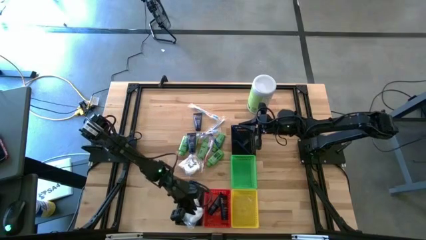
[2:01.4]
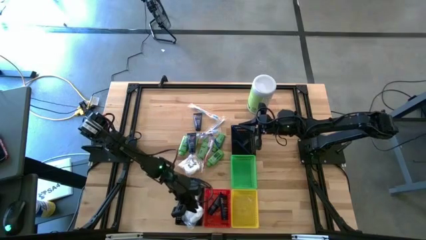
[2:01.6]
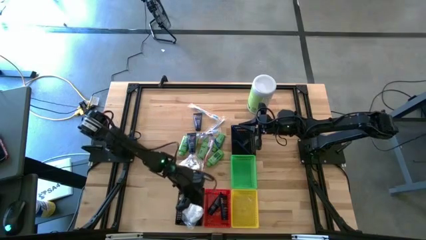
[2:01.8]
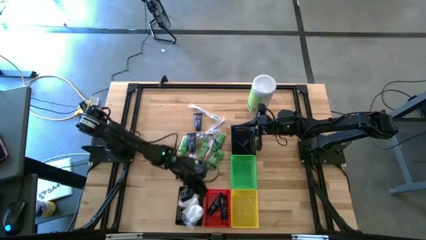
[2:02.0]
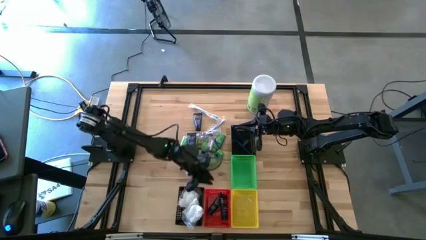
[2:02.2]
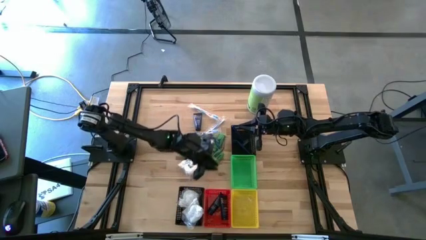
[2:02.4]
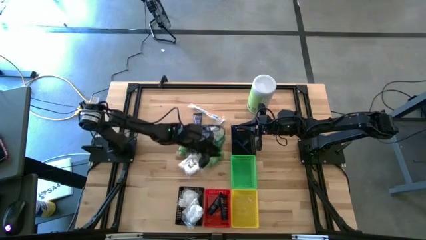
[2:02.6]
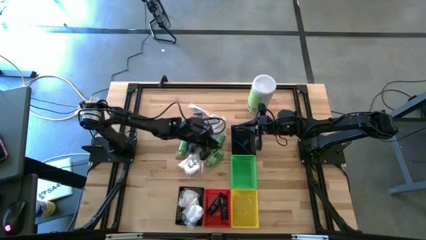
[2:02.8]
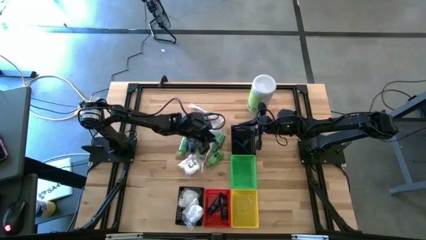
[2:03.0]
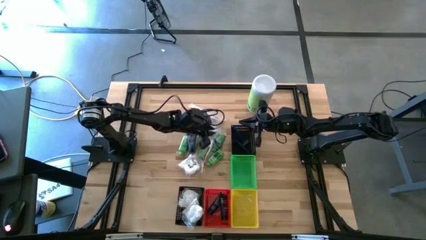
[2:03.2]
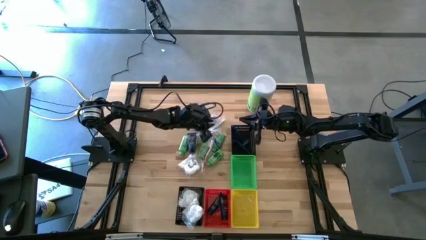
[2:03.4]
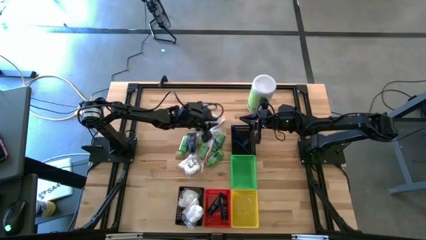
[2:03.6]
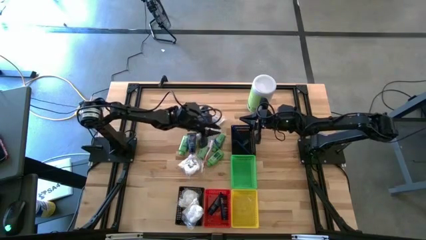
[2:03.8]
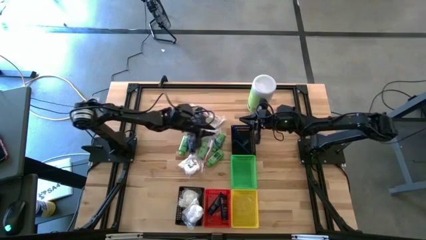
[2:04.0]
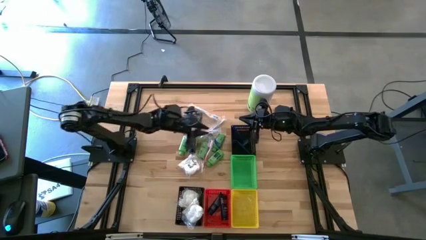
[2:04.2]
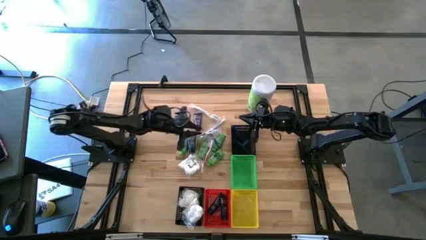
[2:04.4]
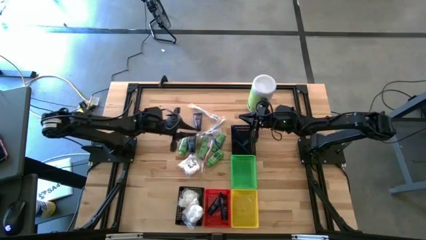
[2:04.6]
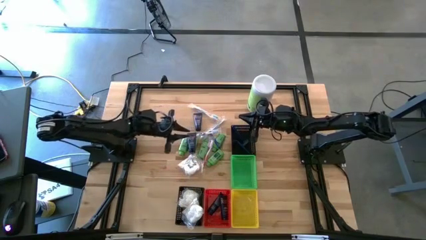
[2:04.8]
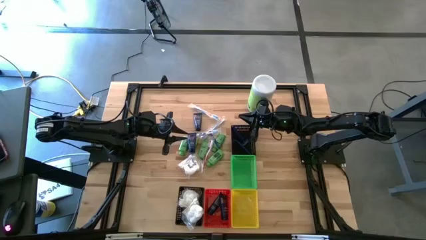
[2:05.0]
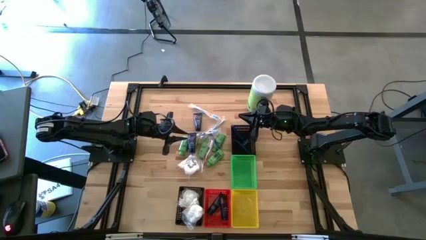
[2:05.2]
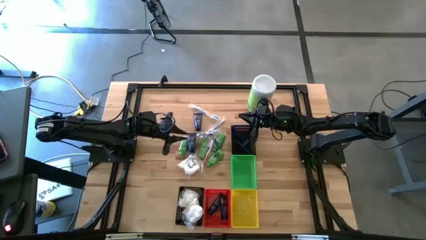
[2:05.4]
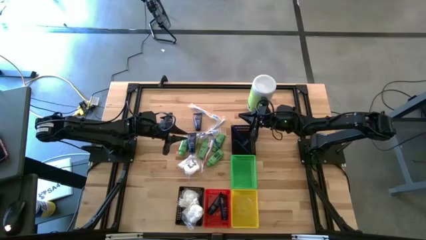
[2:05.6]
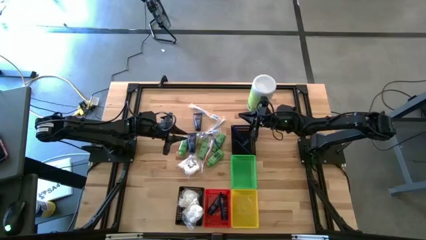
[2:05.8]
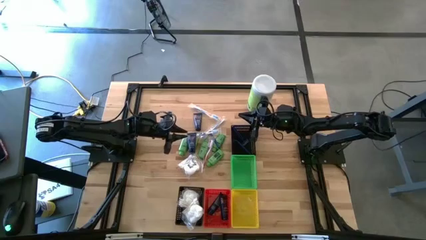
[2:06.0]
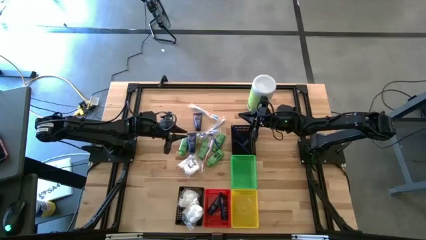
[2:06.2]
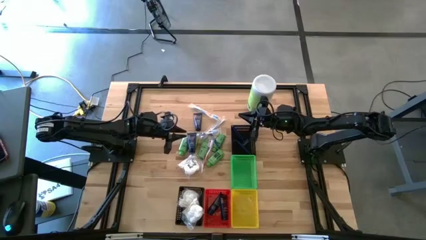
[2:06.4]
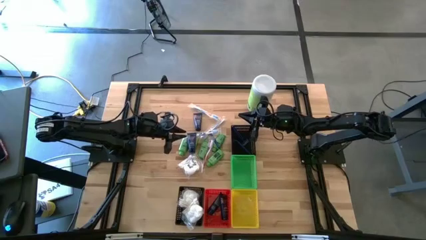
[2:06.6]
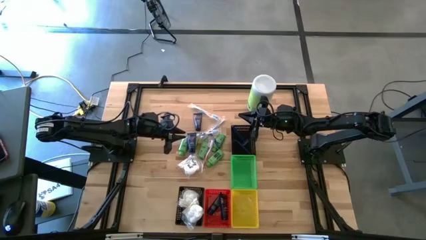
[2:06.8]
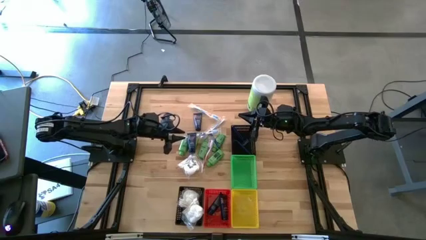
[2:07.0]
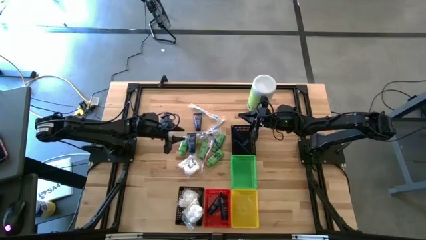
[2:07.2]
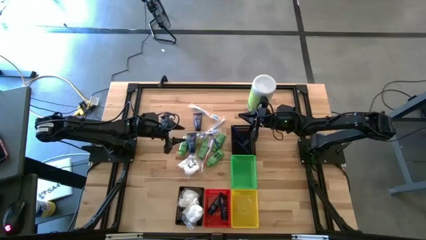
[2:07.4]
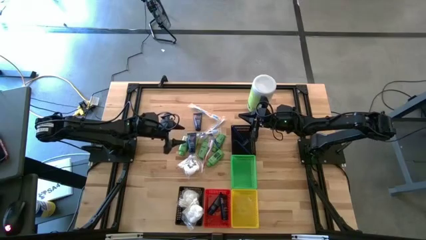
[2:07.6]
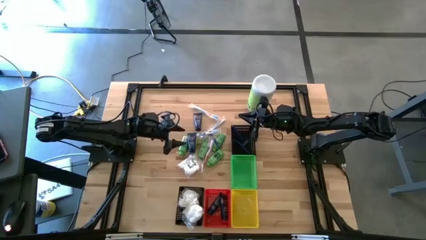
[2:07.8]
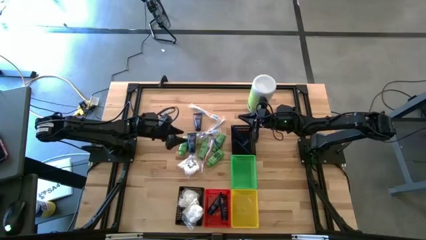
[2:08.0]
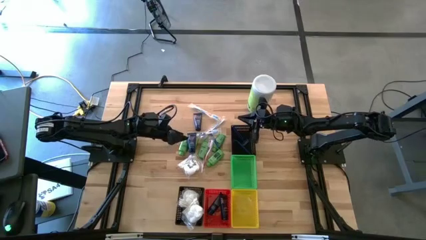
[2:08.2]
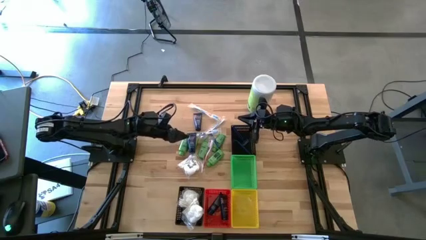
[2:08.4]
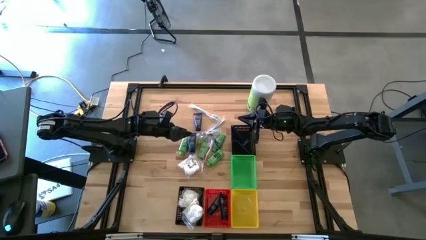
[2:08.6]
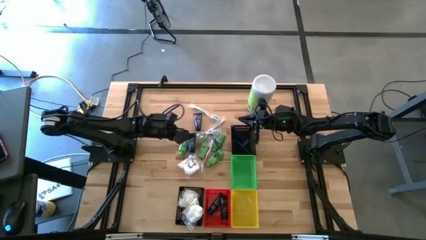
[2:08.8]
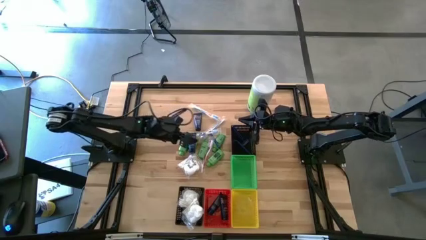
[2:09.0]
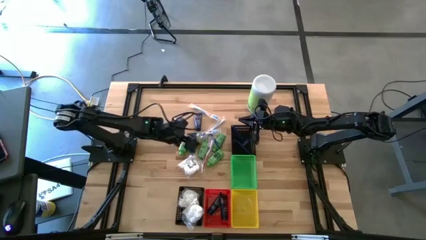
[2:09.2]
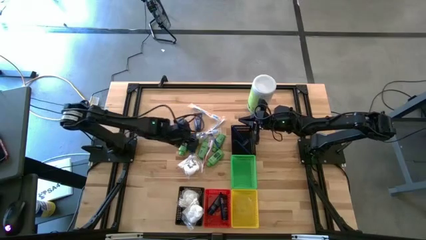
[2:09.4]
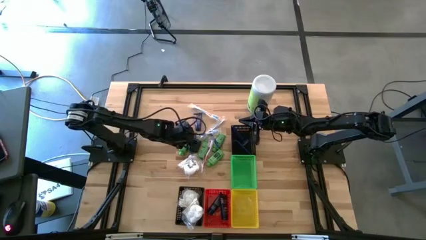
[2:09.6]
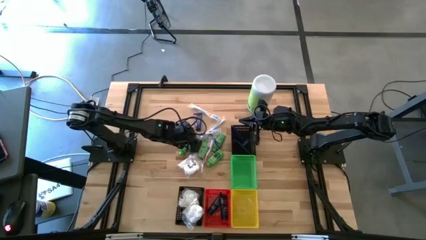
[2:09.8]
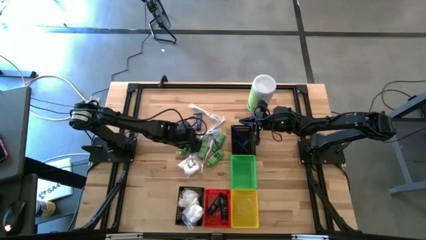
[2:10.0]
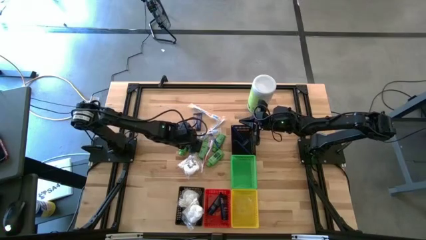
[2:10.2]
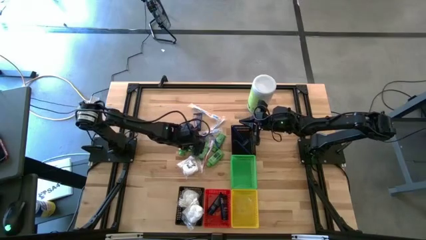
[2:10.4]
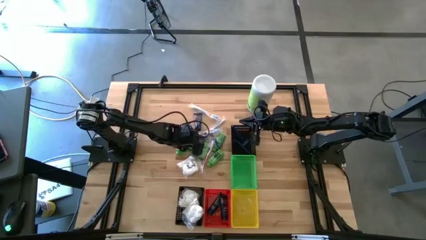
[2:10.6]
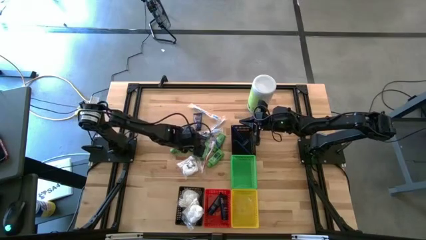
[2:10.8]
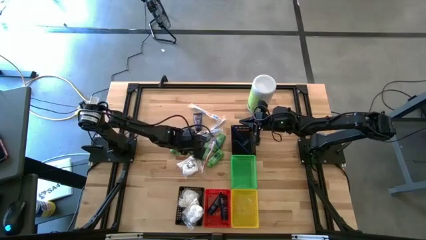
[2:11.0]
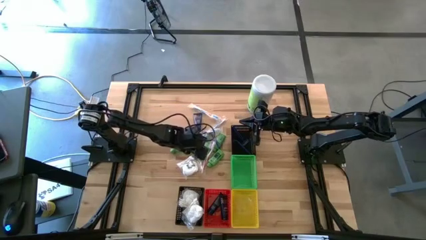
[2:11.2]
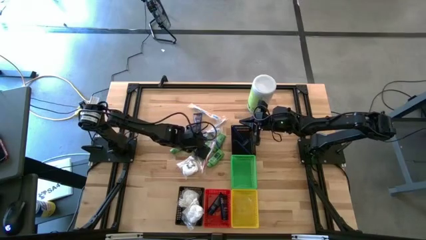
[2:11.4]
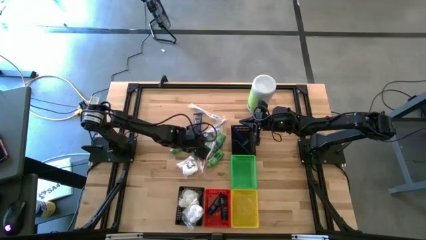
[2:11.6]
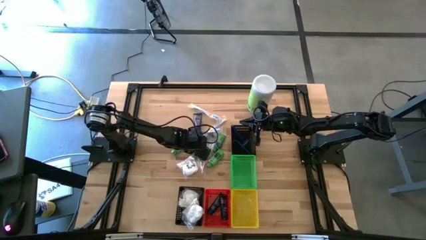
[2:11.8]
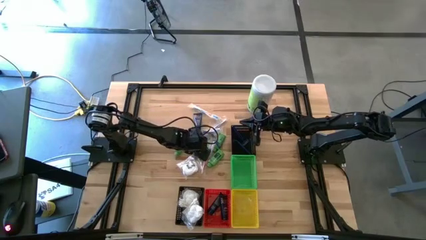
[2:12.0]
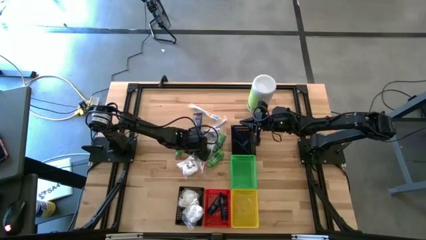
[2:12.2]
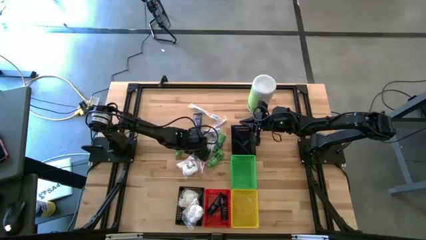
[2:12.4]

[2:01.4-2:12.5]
Task: Pick & Place Travel size toiletries
Put the blue shave cream into the red bin

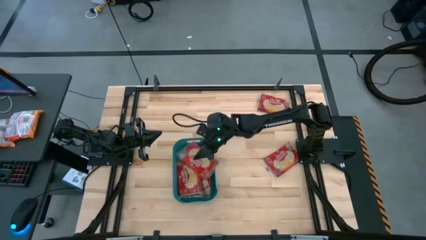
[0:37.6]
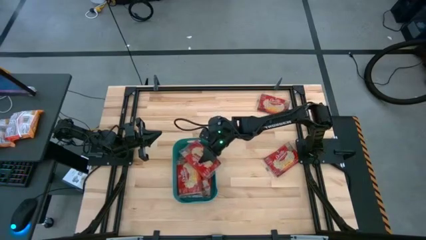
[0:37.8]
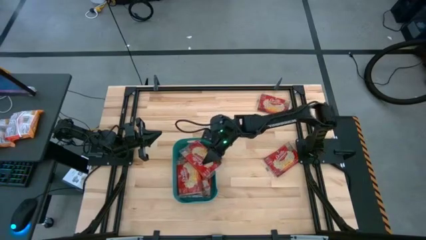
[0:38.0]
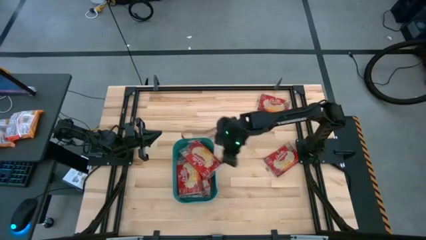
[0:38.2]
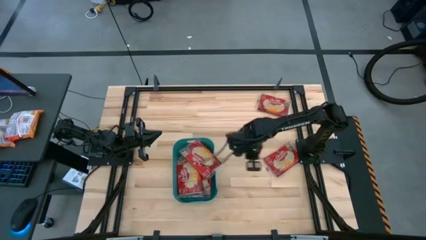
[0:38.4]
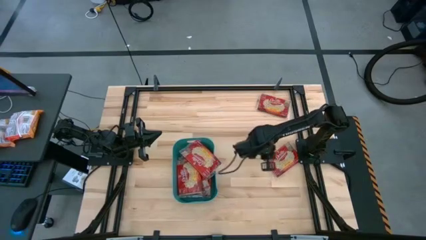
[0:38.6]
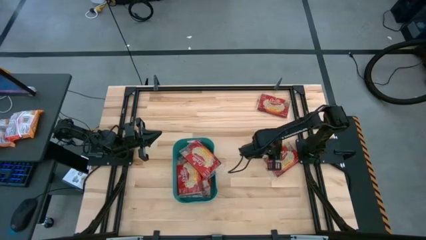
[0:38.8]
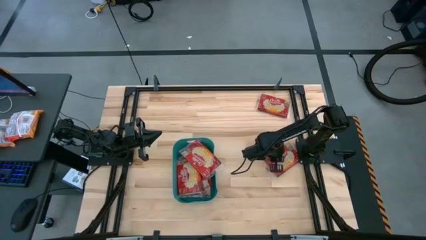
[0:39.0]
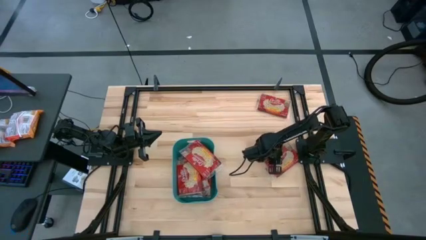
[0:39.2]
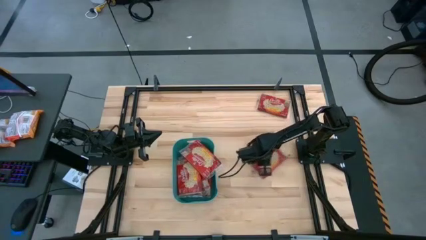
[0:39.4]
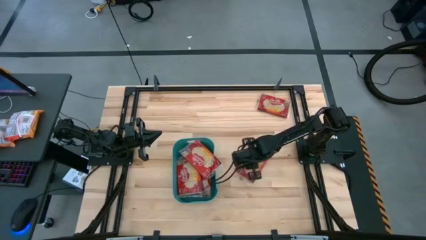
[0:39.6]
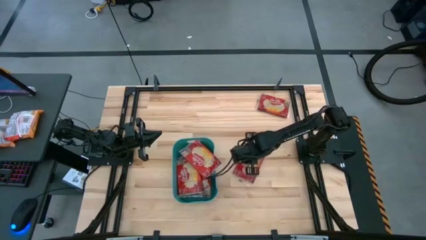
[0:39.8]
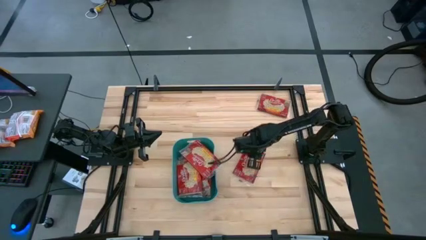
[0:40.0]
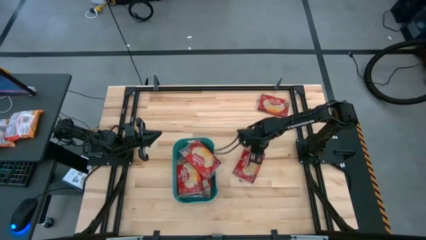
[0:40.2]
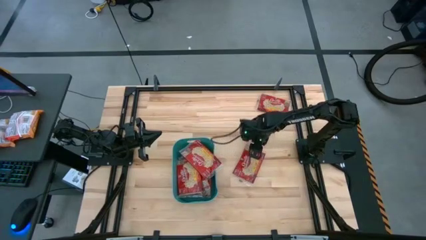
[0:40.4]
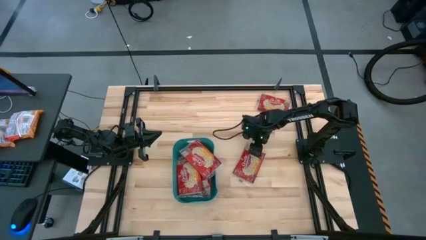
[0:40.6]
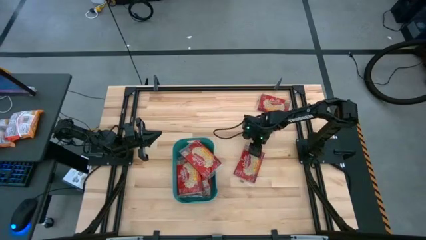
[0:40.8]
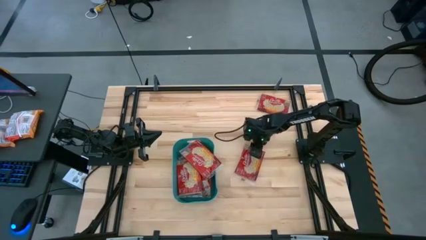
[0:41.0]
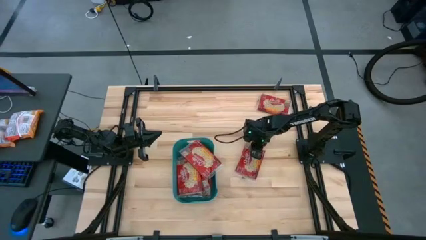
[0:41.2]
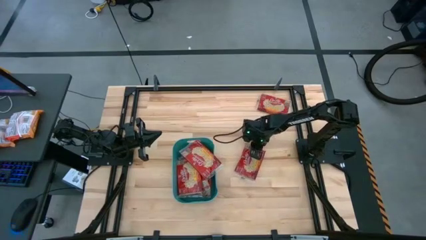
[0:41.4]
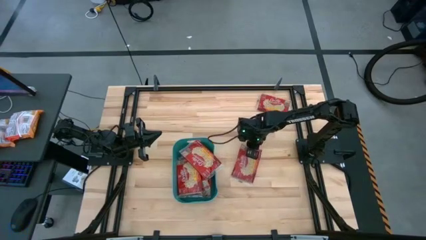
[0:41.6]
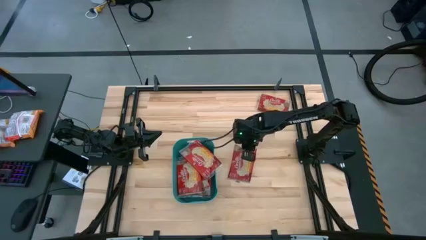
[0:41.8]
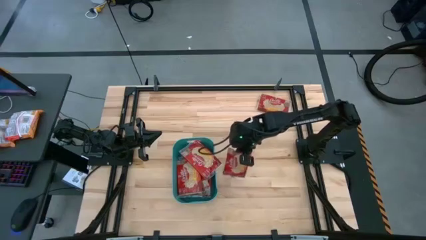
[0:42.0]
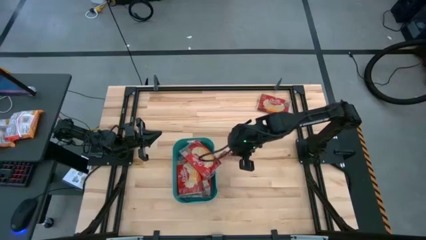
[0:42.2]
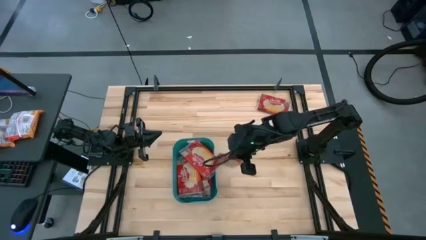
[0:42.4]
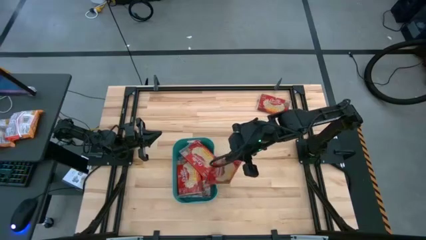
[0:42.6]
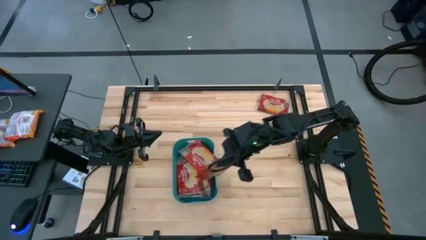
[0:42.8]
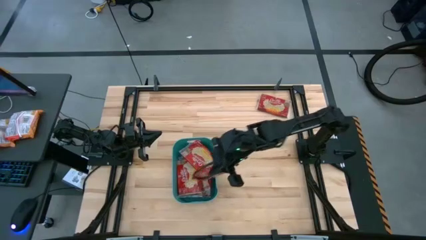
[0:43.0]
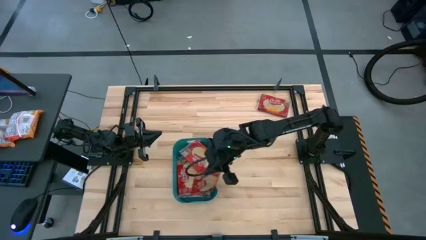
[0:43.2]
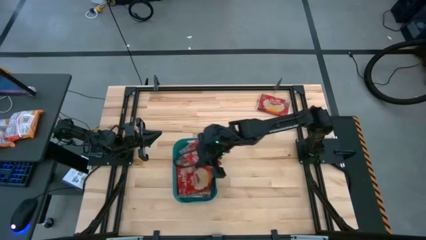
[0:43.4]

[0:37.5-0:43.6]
Task: Sort popcorn bags into baskets
Put the red popcorn bag into the green bin
